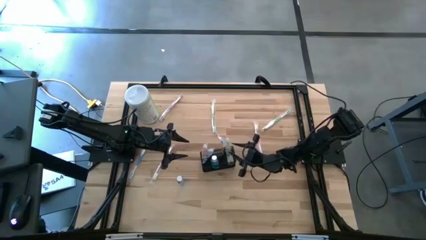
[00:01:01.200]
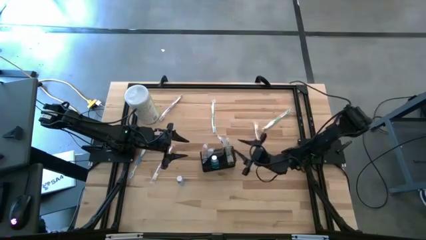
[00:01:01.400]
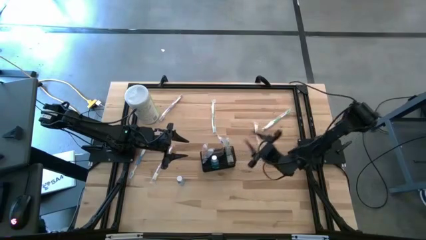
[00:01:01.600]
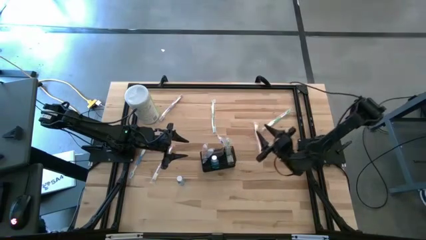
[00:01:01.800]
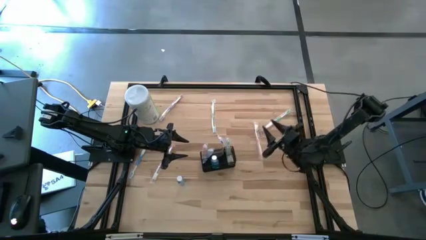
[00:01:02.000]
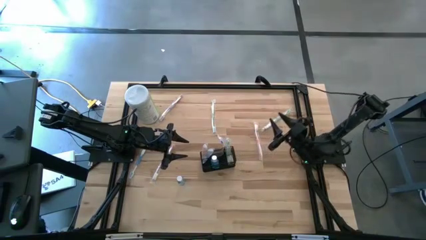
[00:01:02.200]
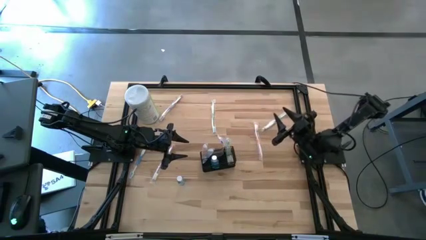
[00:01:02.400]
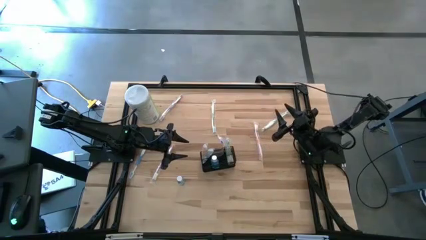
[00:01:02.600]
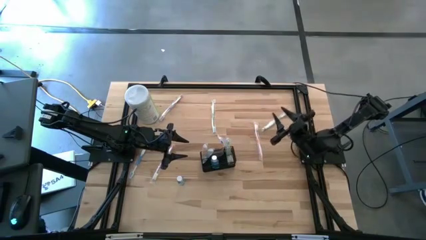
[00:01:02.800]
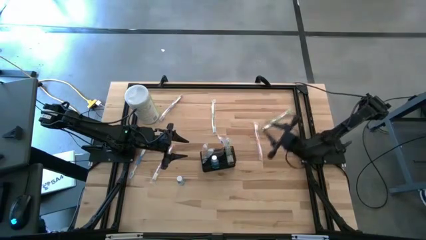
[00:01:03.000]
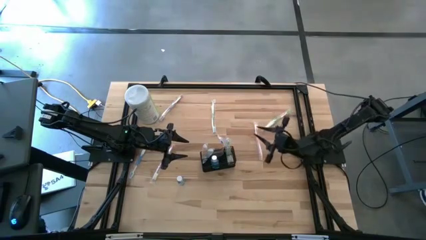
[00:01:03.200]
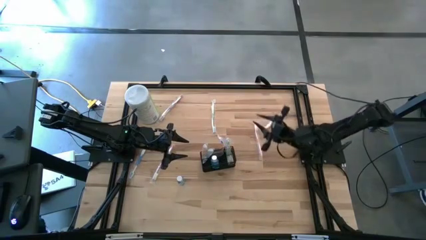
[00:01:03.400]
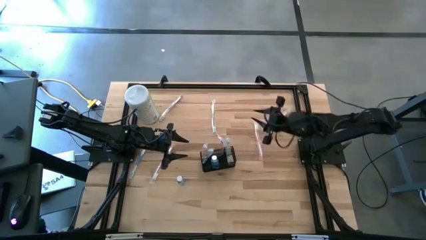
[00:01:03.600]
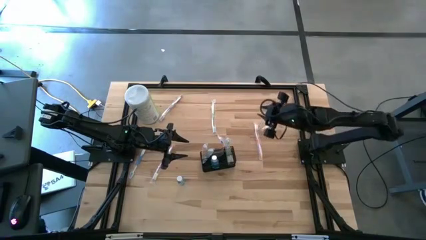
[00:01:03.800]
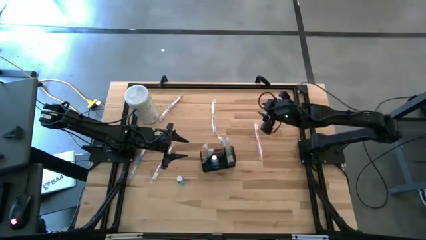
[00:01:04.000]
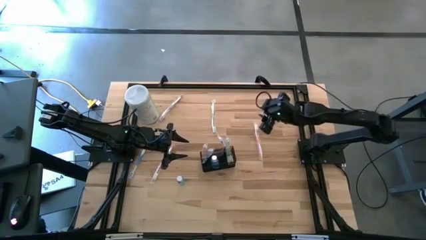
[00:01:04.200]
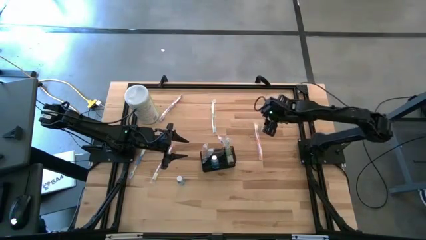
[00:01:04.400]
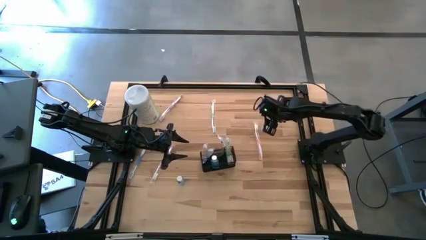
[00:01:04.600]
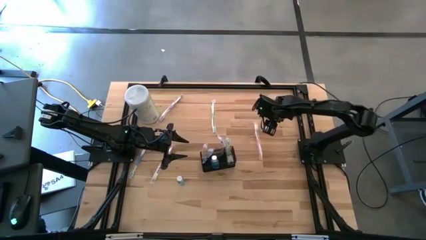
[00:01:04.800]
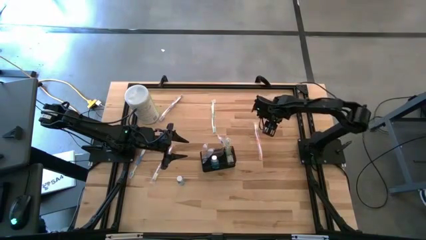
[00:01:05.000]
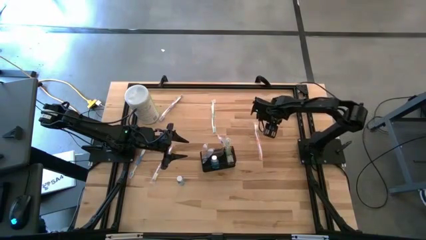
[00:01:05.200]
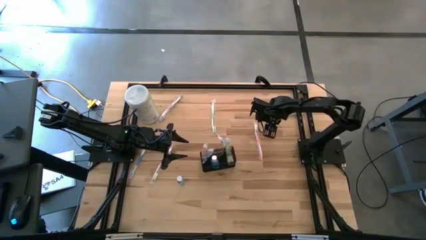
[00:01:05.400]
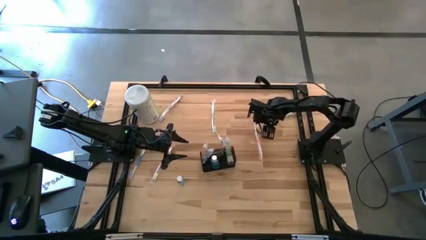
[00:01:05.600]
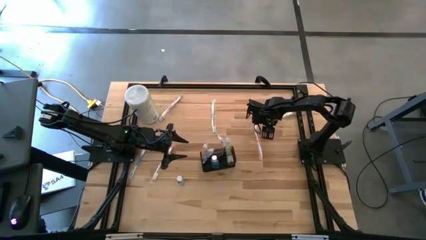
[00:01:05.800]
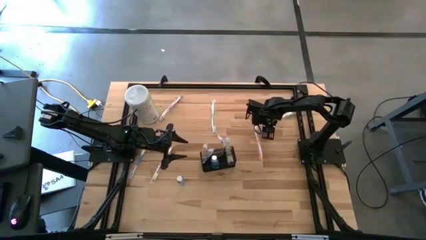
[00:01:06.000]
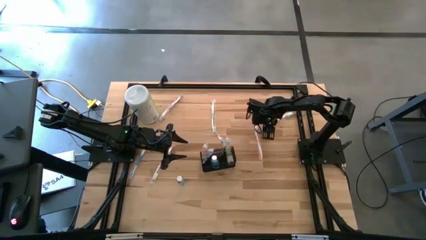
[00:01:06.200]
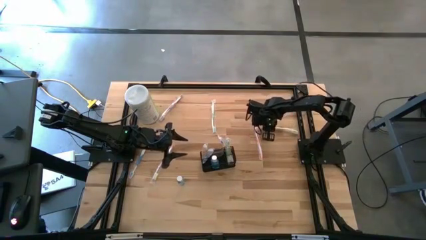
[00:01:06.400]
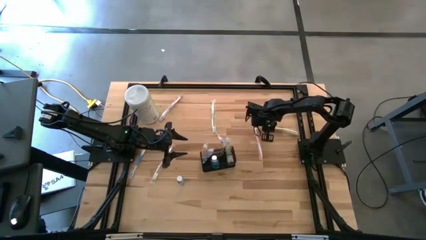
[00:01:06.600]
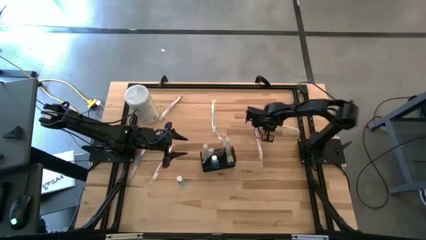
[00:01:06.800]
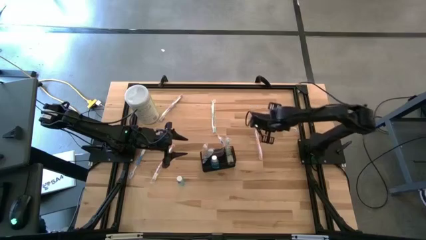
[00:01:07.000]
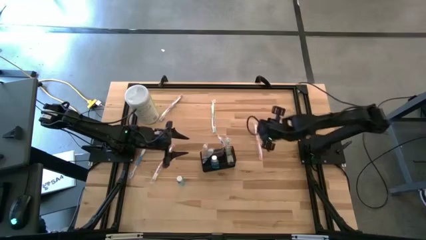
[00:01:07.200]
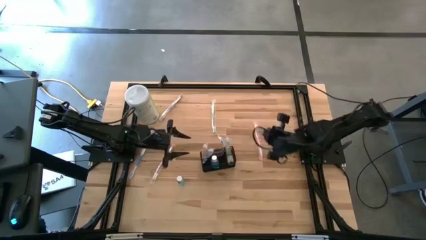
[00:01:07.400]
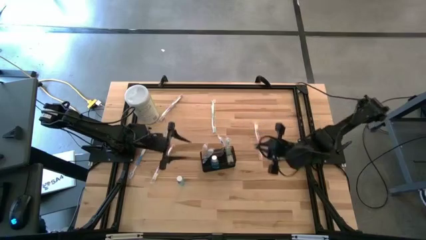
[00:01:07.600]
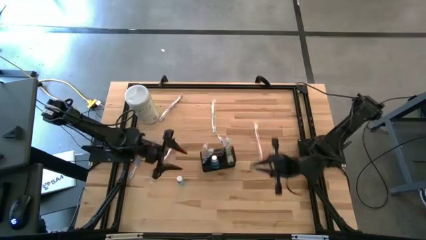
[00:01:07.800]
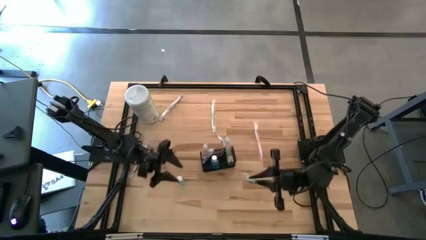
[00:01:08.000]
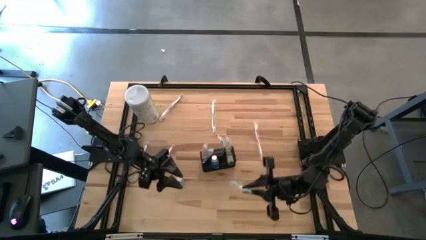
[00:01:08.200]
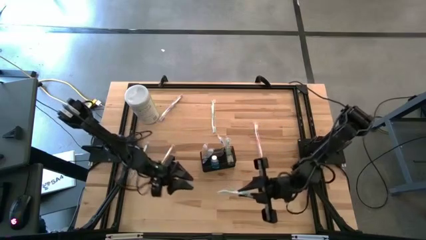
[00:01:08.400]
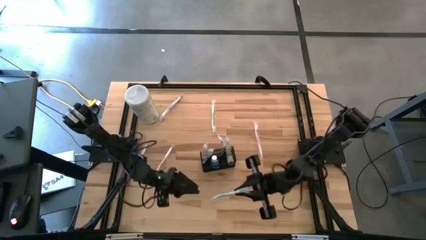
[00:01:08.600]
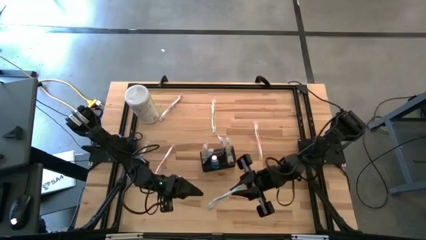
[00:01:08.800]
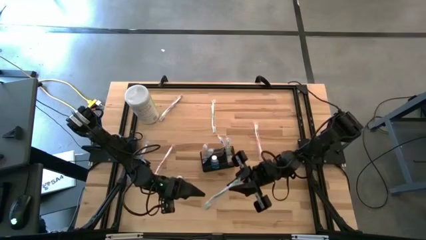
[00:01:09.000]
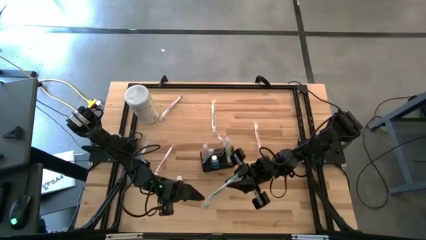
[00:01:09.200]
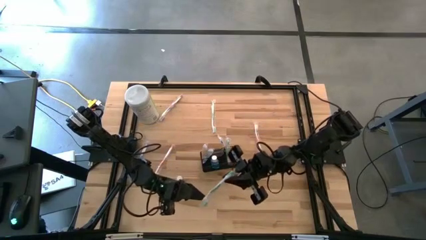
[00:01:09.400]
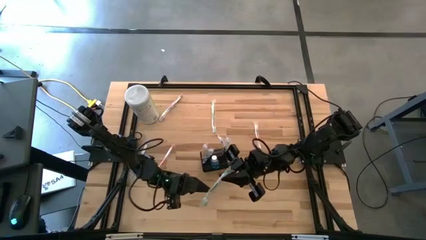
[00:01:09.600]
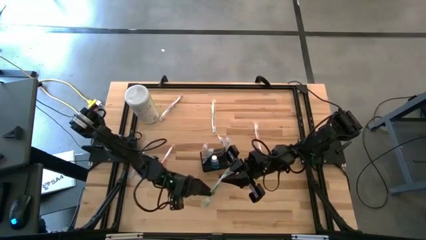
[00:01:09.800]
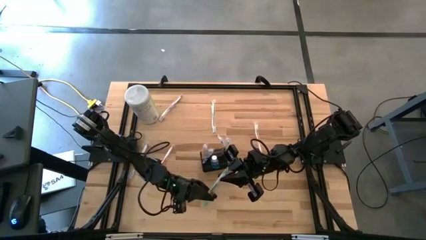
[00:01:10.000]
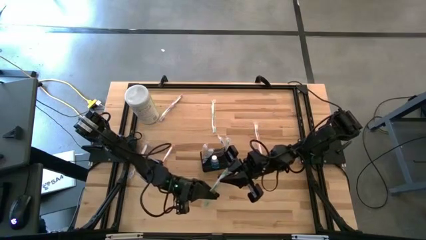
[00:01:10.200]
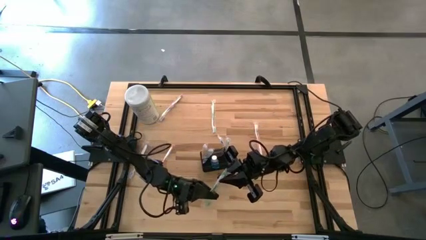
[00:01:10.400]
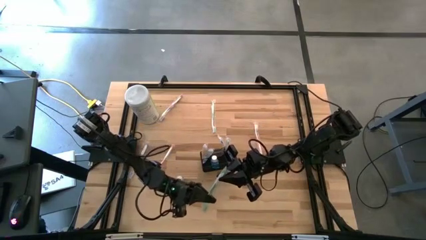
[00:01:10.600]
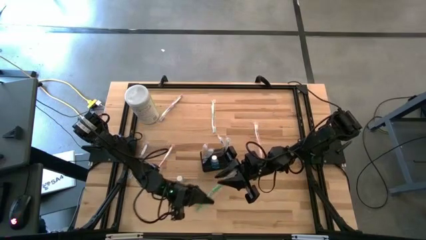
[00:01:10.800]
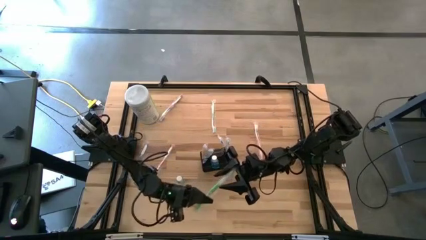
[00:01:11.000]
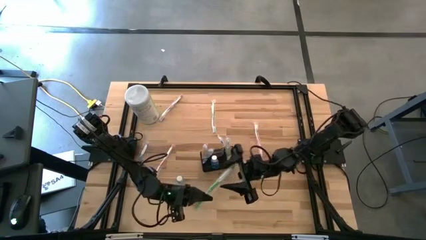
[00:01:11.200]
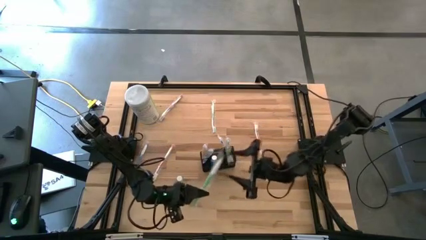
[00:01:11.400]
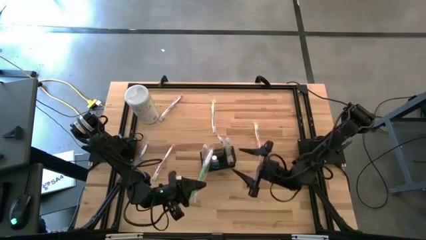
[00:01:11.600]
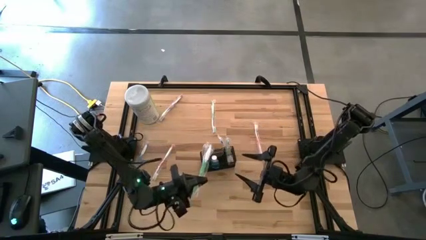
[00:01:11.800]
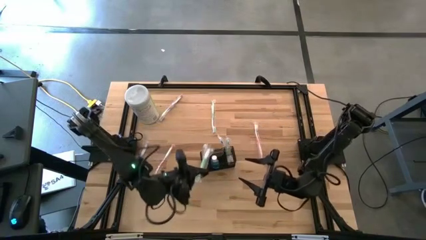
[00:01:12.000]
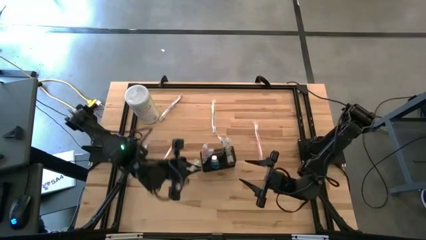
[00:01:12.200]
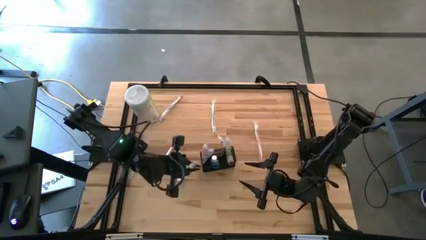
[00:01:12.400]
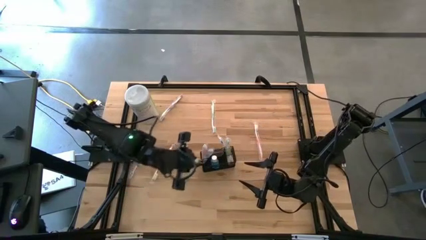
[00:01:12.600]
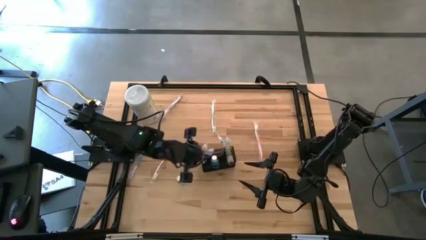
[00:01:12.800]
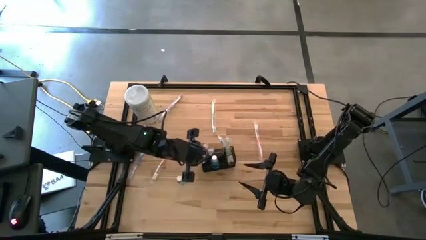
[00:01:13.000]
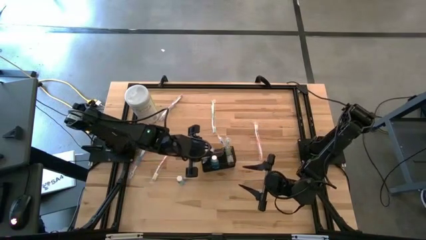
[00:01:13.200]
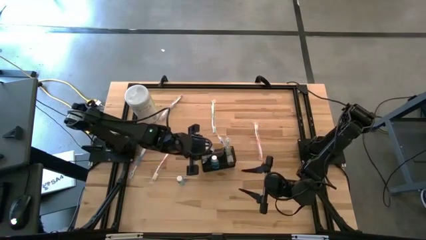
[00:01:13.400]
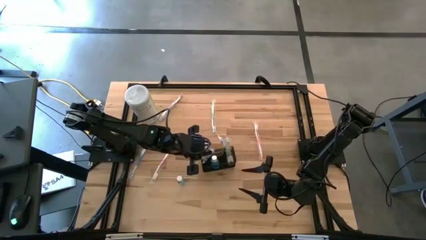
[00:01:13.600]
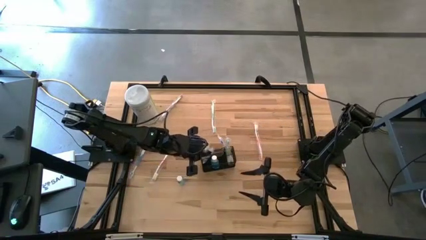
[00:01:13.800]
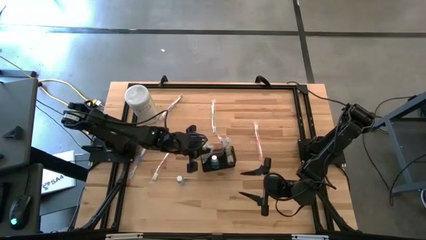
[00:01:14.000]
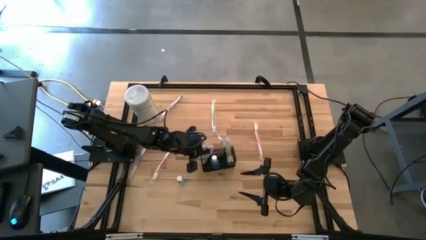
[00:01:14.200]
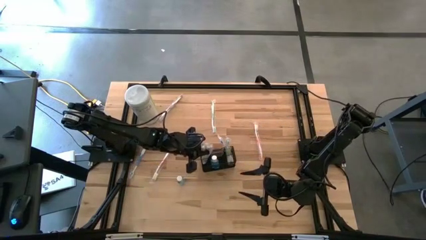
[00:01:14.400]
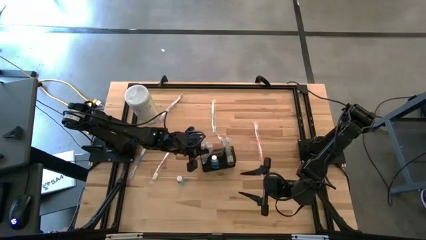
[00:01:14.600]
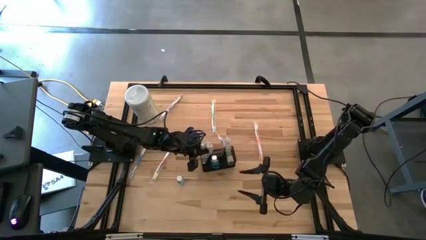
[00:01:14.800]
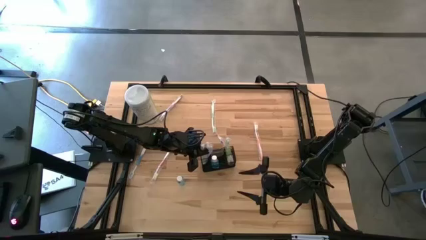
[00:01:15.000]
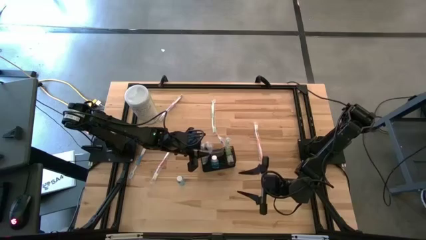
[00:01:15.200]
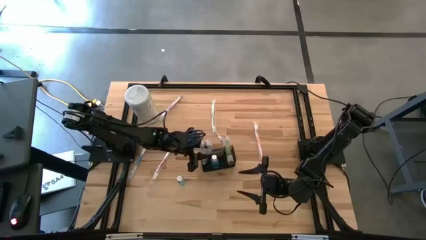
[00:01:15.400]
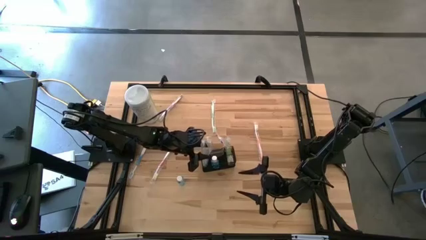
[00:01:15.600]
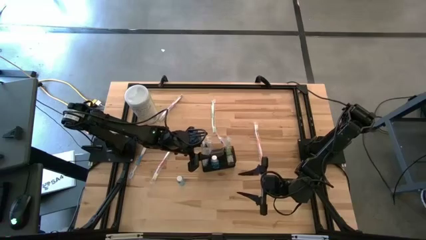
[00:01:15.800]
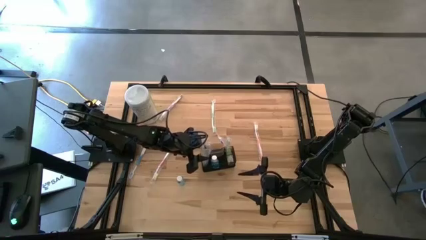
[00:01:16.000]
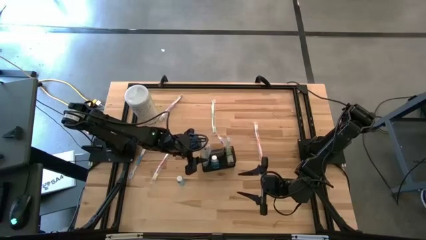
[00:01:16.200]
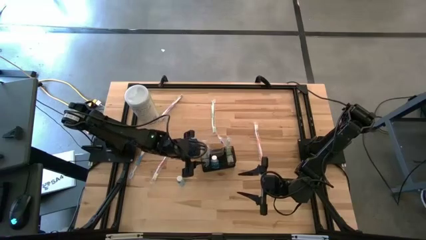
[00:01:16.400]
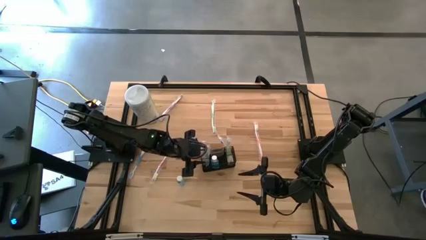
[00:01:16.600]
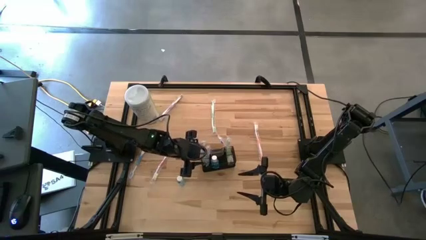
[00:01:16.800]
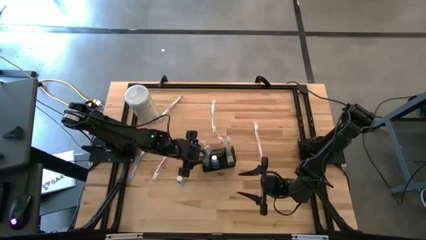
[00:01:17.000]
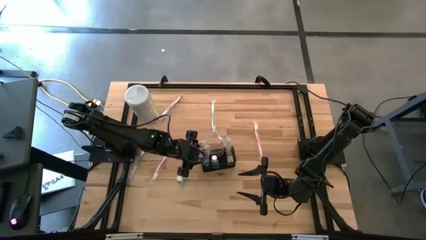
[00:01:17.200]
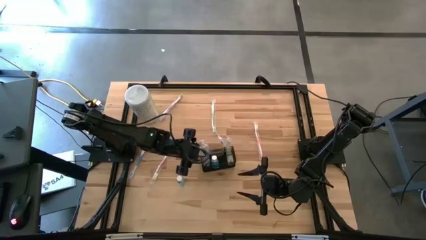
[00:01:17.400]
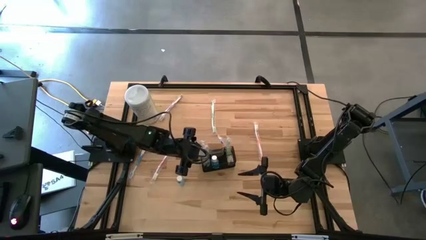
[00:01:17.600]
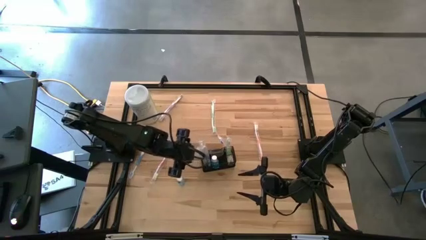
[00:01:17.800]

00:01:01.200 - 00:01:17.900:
Task: Pick & Place toothbrushing station
Put the right green toothbrush into the black wire organizer
